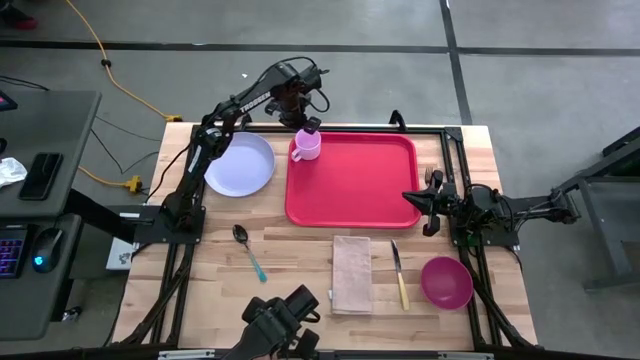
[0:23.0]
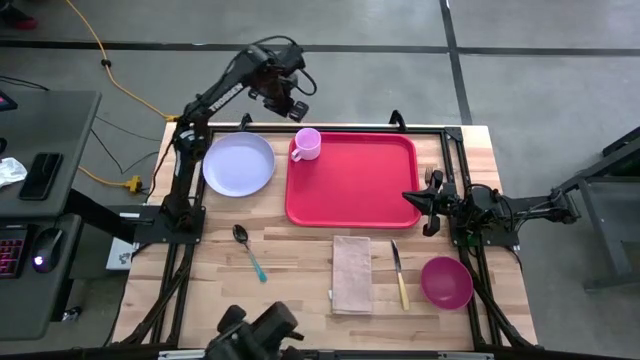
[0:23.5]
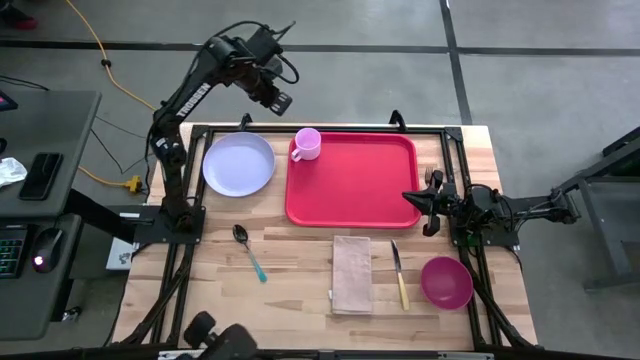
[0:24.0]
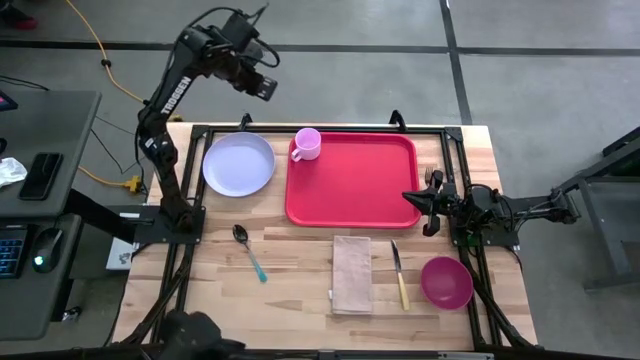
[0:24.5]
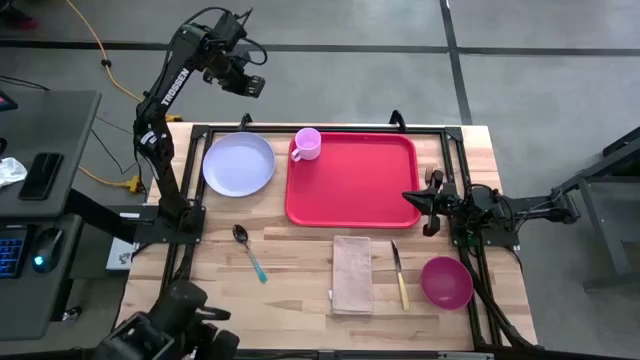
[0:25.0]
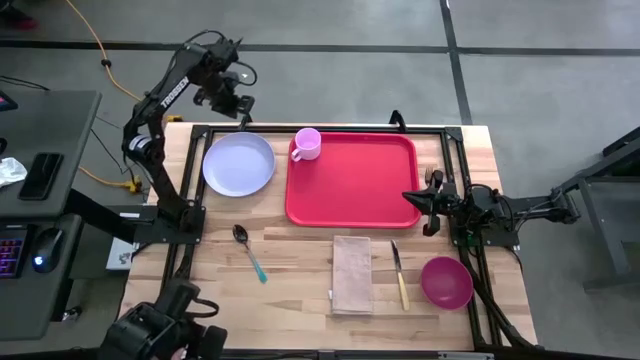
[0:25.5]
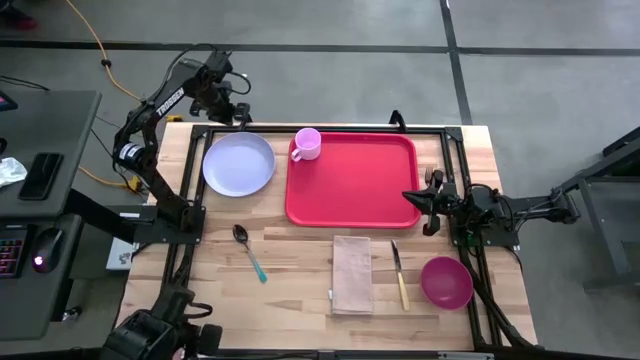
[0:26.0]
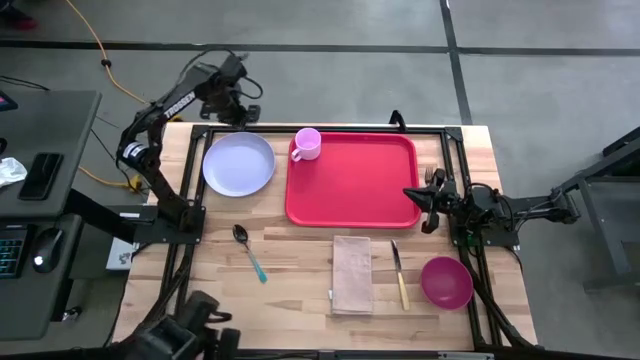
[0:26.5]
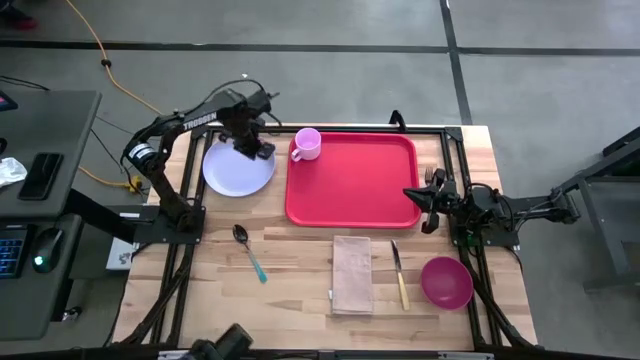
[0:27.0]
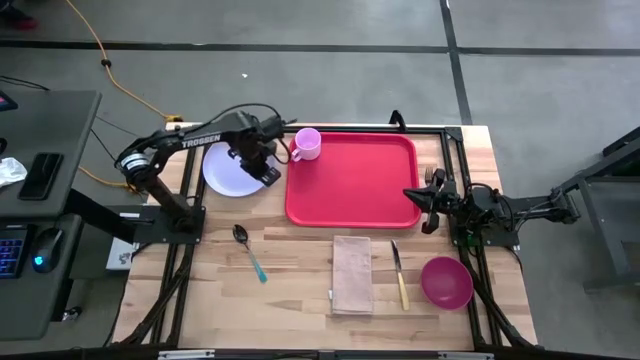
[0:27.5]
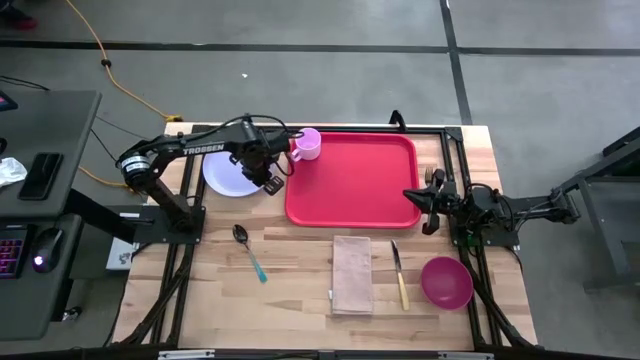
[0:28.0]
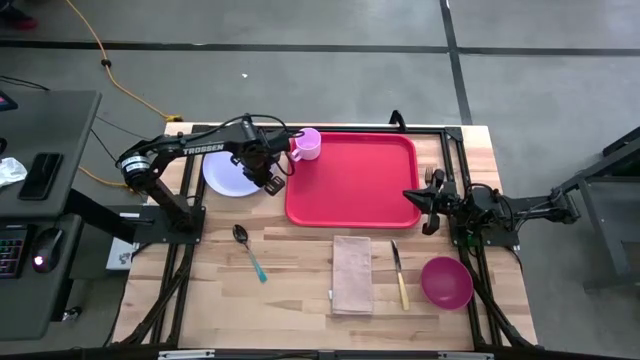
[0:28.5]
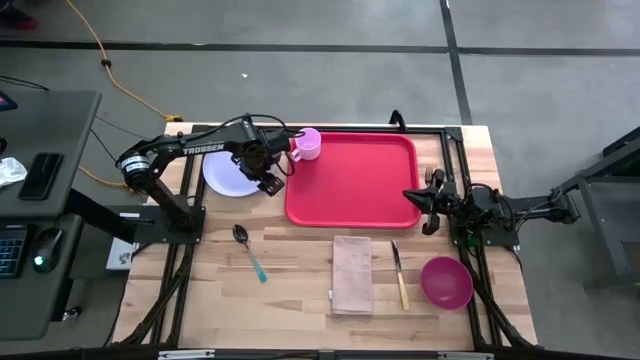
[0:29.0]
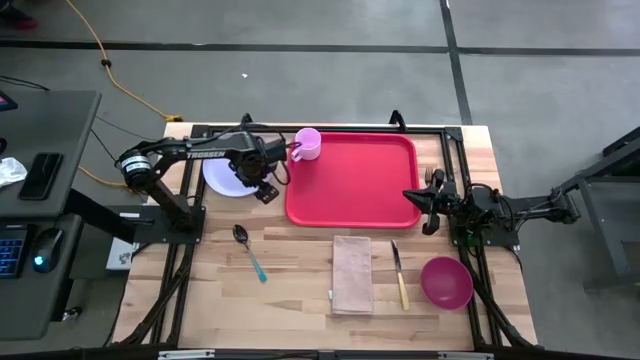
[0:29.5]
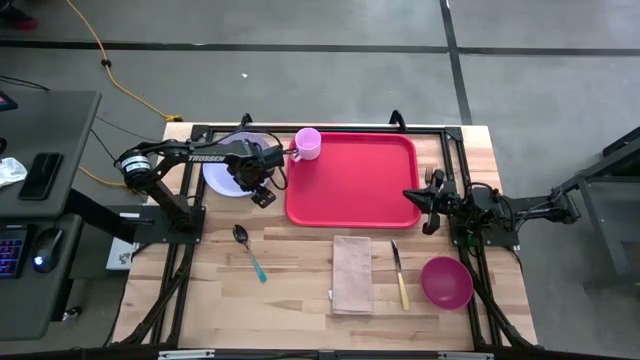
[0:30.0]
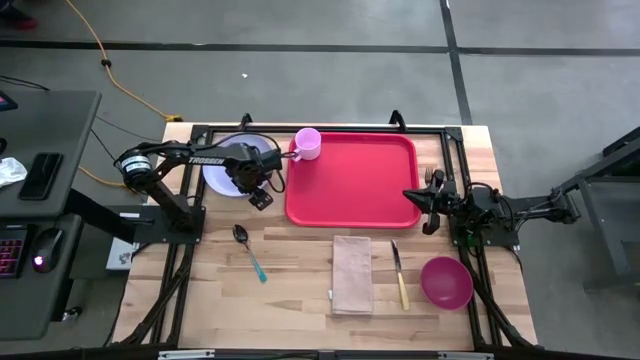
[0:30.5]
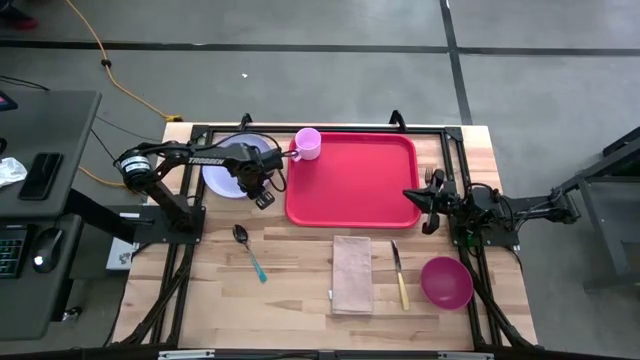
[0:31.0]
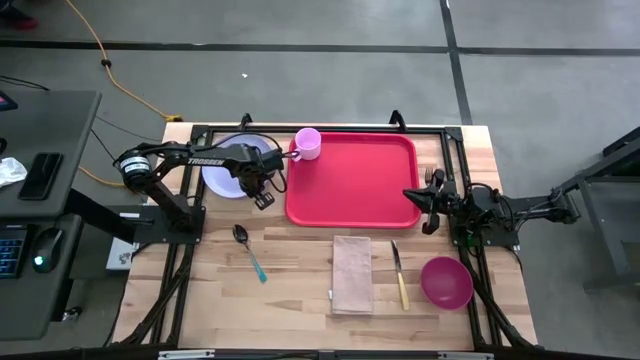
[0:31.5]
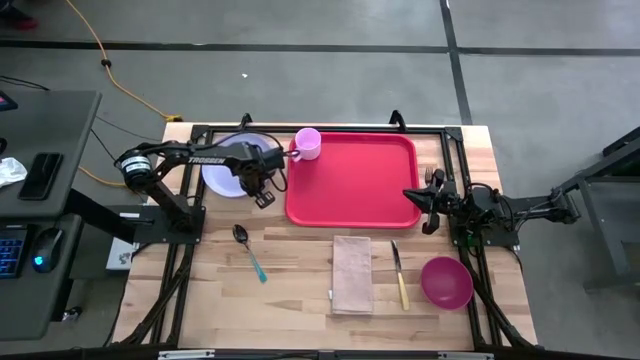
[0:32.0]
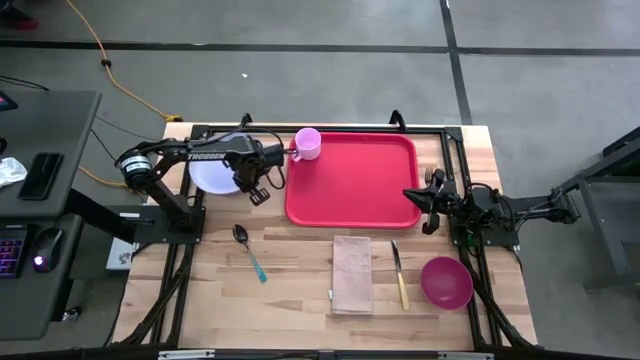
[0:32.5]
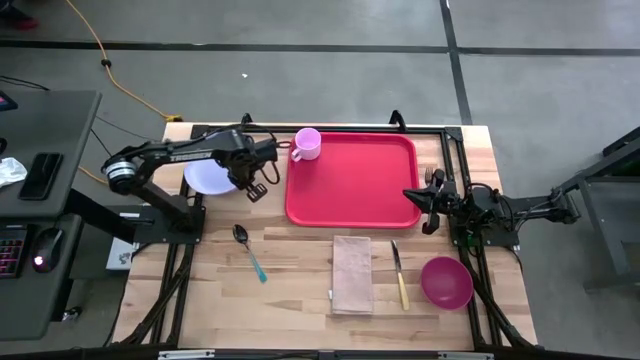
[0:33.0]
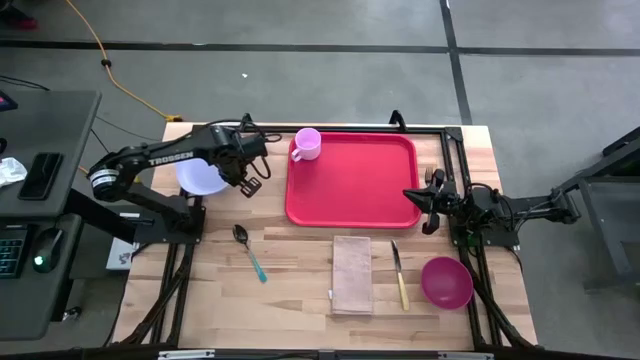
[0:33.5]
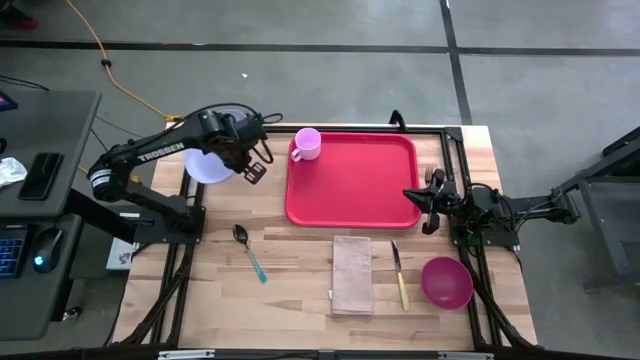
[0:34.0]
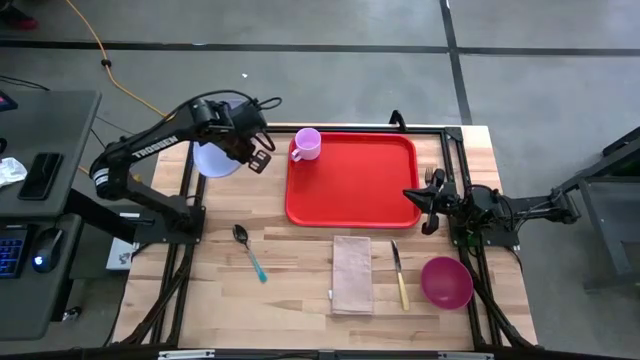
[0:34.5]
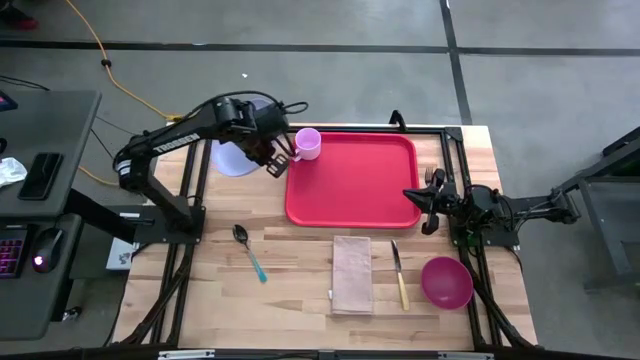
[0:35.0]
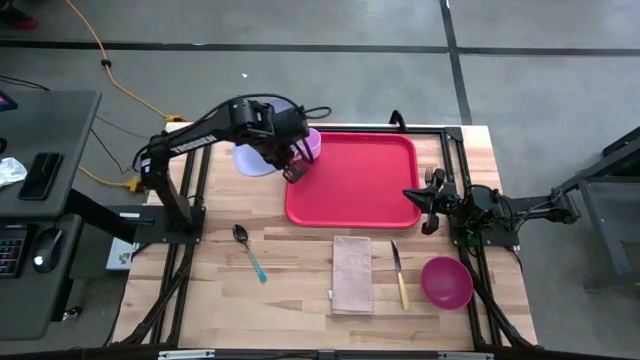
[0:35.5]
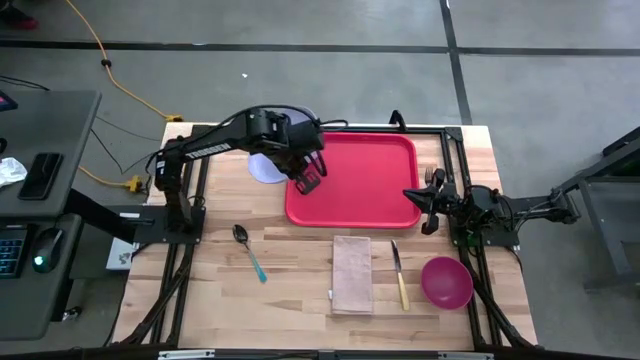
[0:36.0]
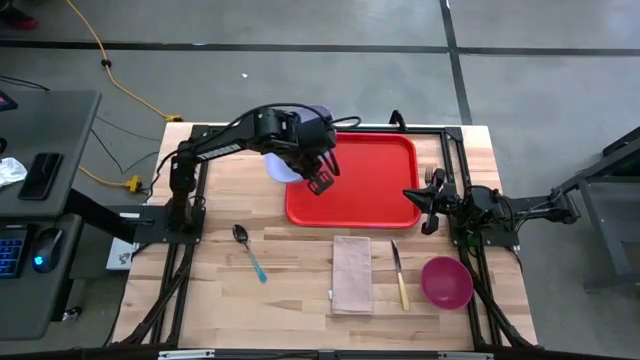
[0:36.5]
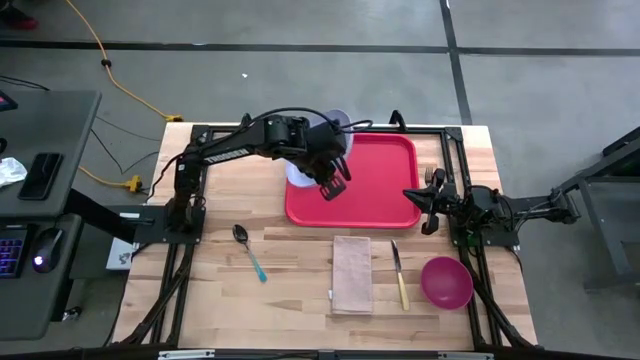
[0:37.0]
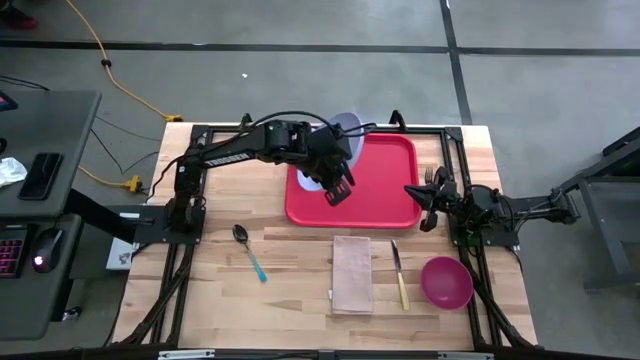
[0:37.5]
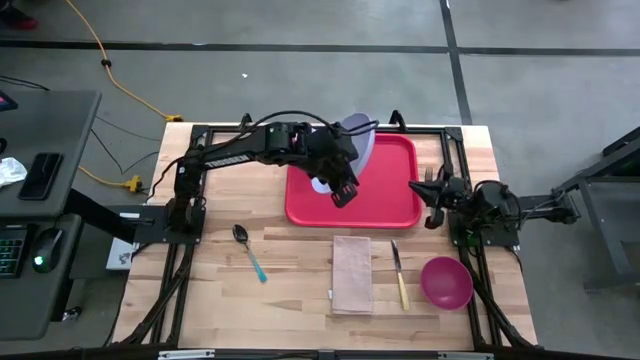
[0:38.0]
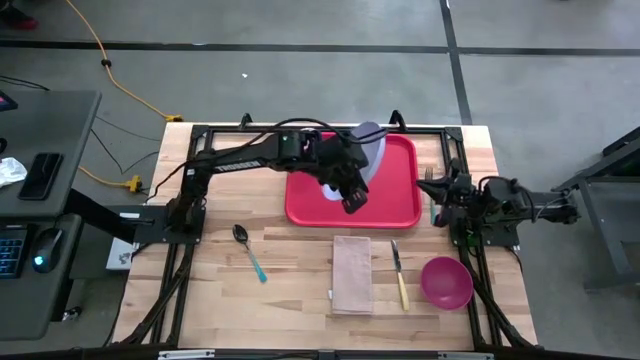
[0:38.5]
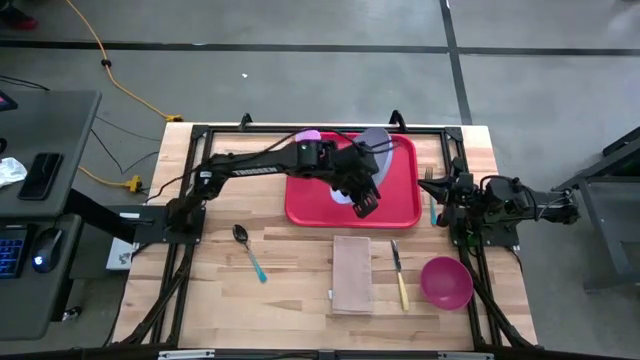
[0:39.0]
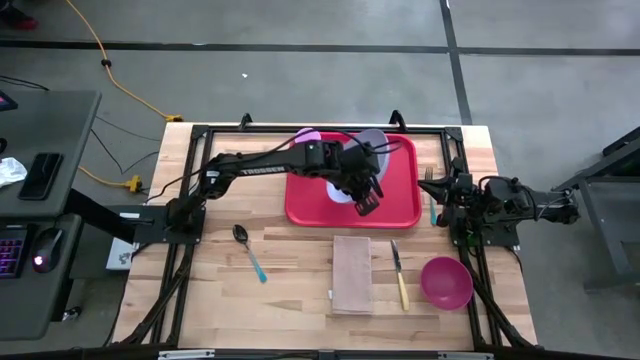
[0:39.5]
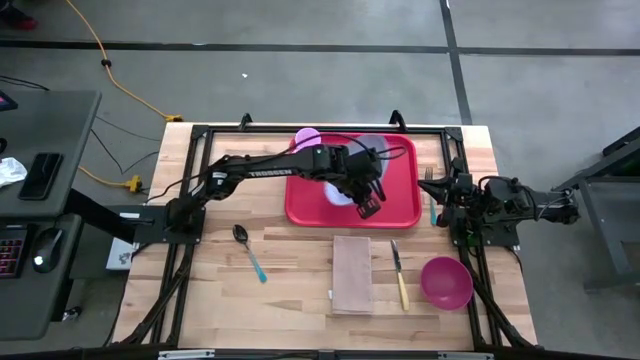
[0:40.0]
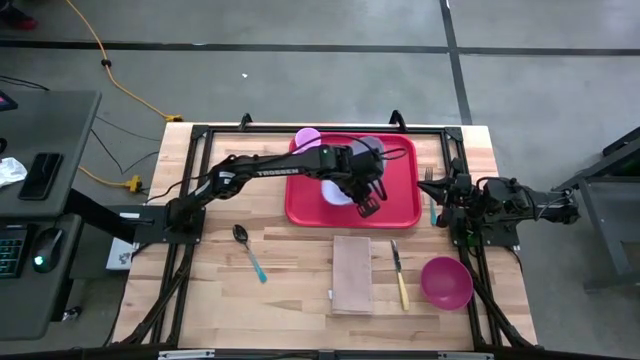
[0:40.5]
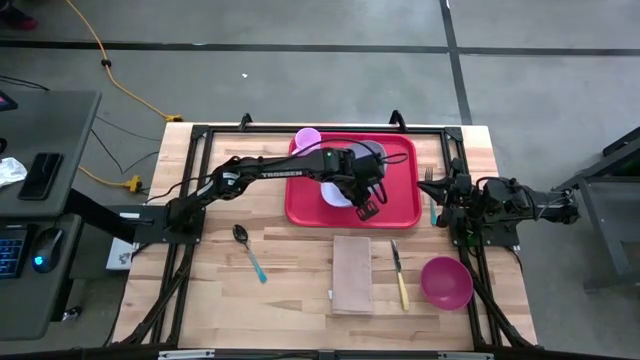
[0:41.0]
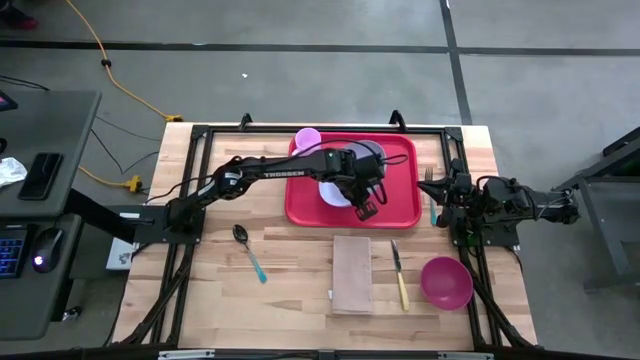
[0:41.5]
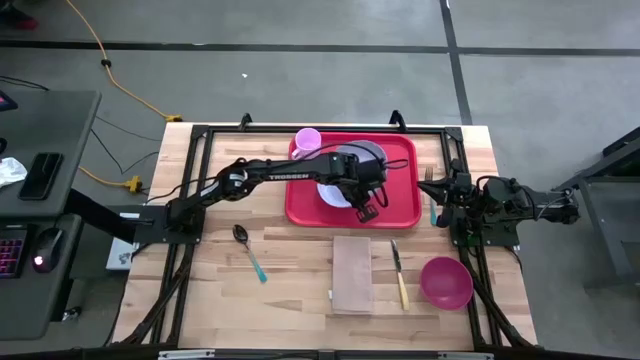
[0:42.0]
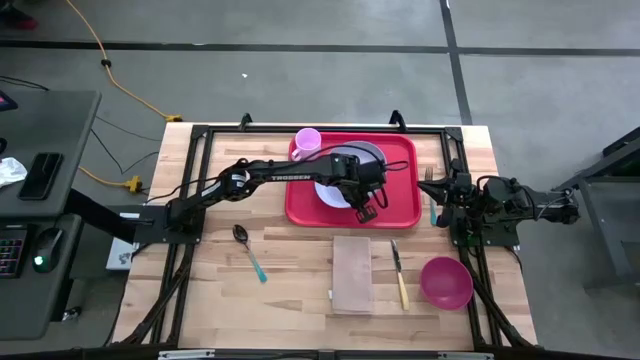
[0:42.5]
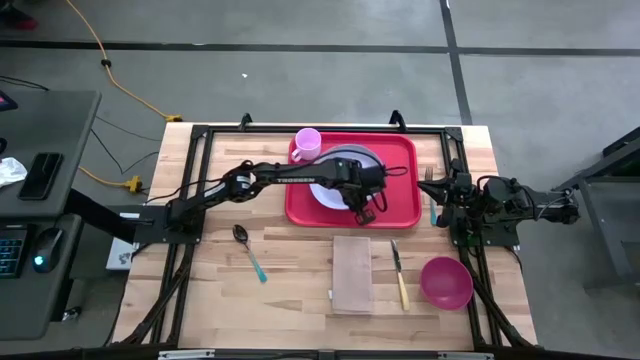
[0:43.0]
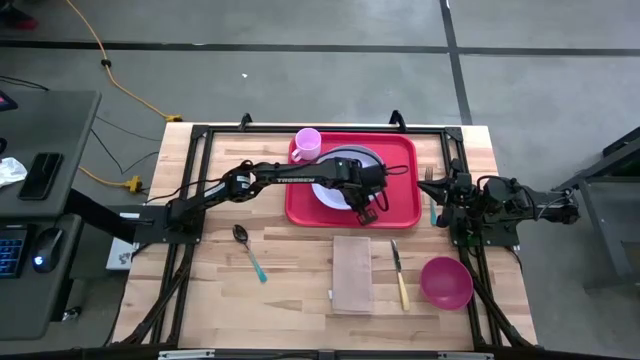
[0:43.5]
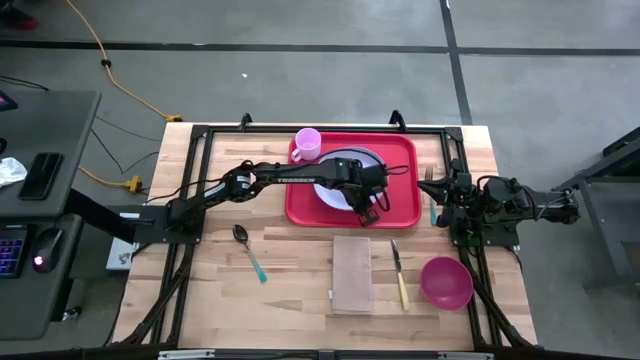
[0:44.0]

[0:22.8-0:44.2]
Task: Set up tray
Put the blue plate below the pink mug on the red serving tray
